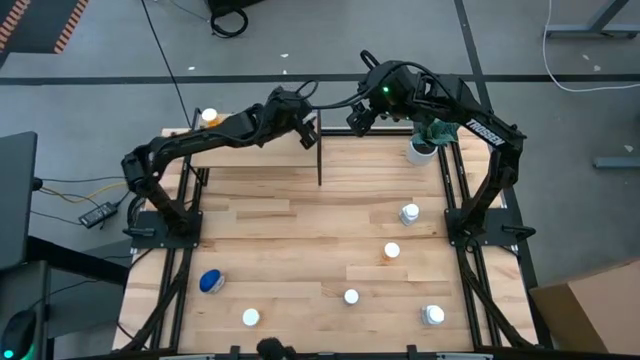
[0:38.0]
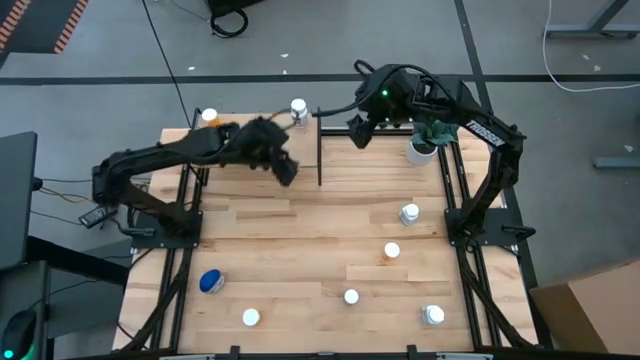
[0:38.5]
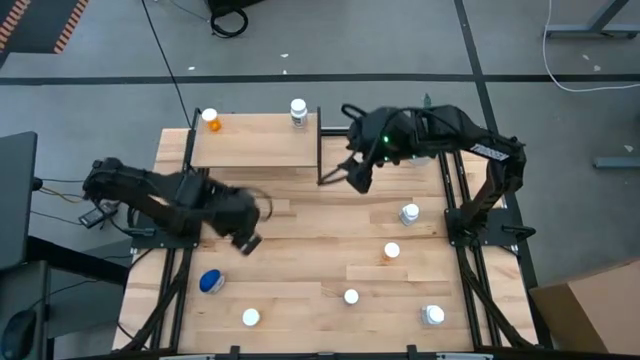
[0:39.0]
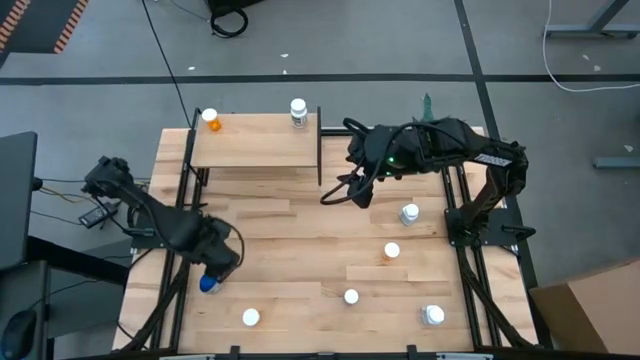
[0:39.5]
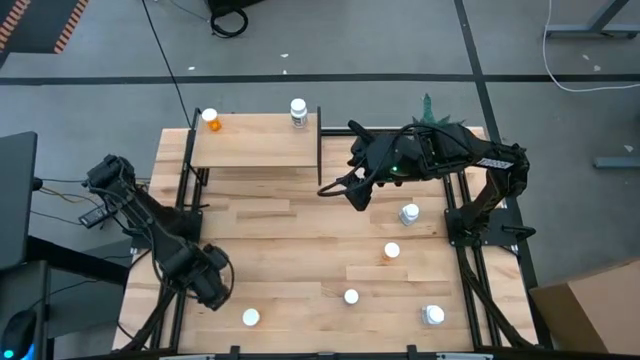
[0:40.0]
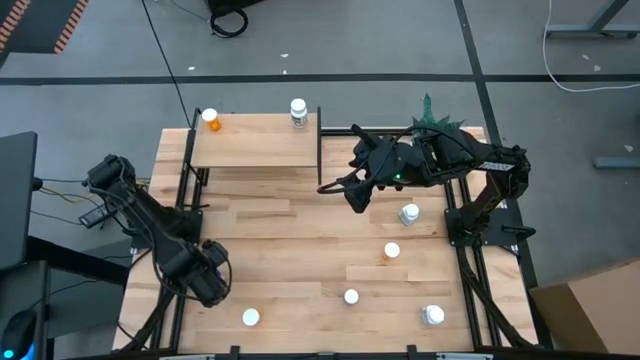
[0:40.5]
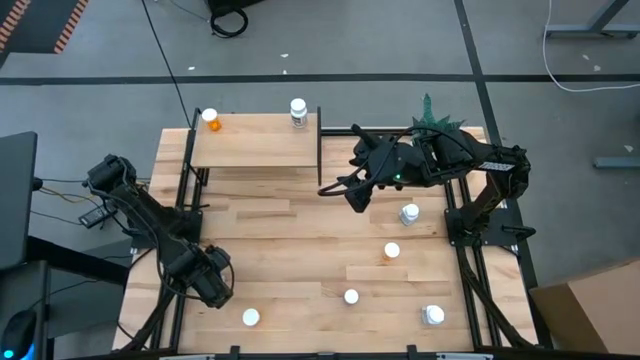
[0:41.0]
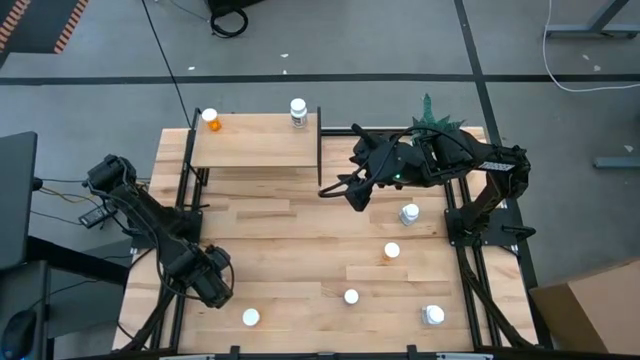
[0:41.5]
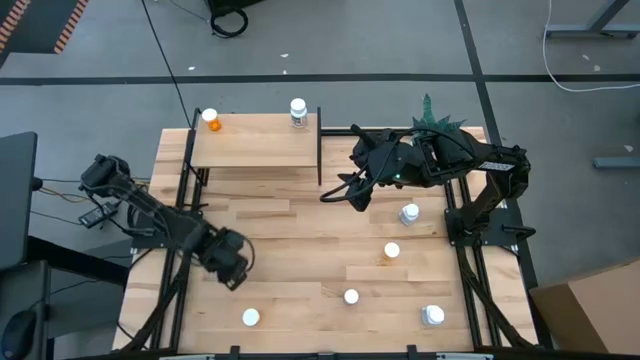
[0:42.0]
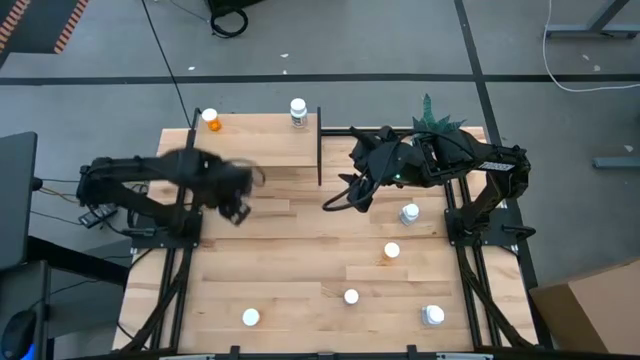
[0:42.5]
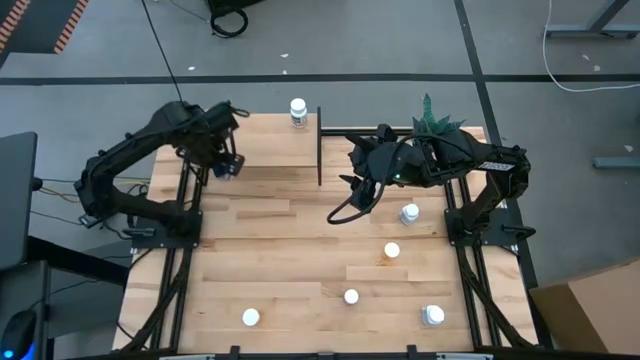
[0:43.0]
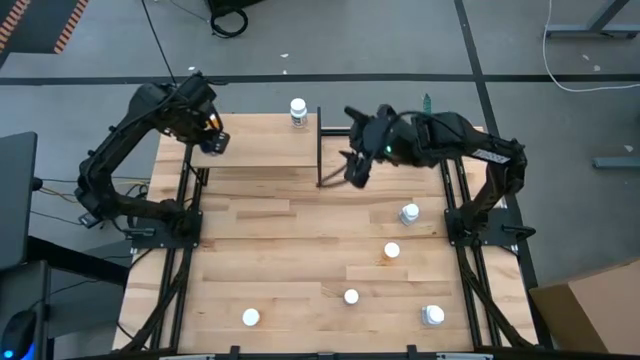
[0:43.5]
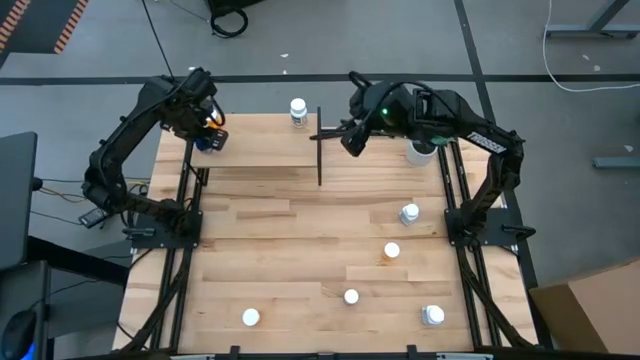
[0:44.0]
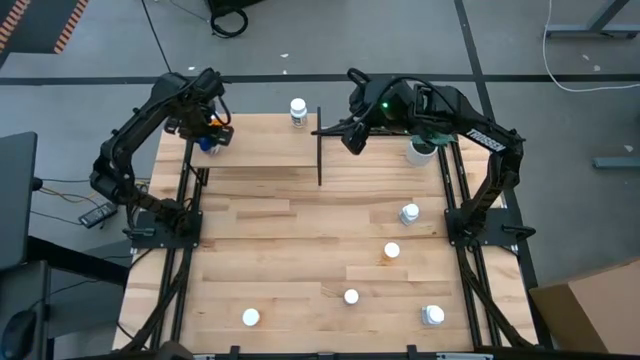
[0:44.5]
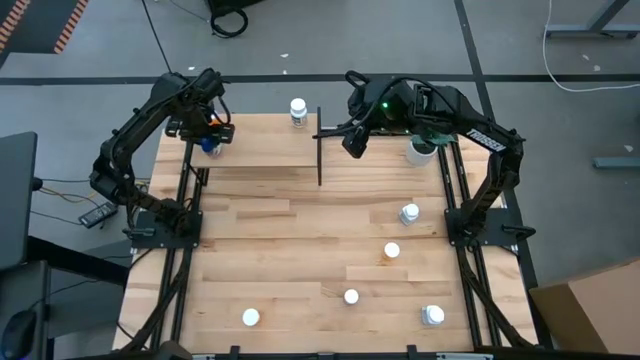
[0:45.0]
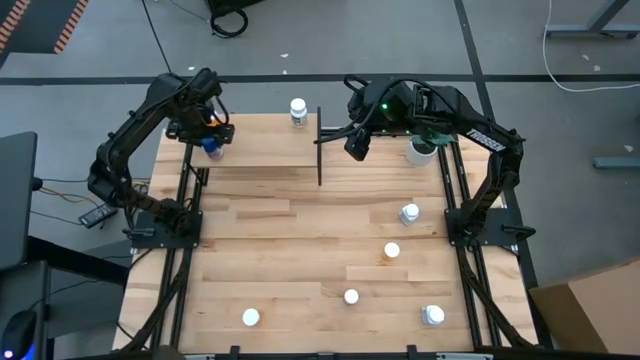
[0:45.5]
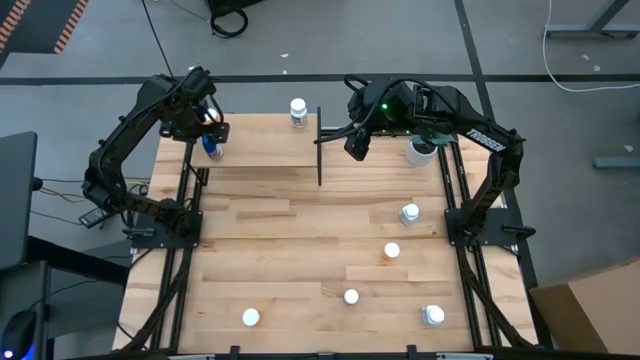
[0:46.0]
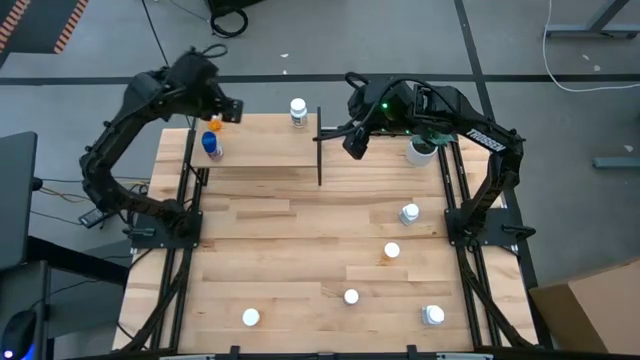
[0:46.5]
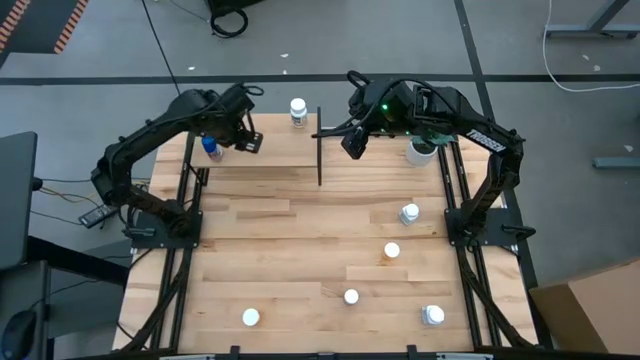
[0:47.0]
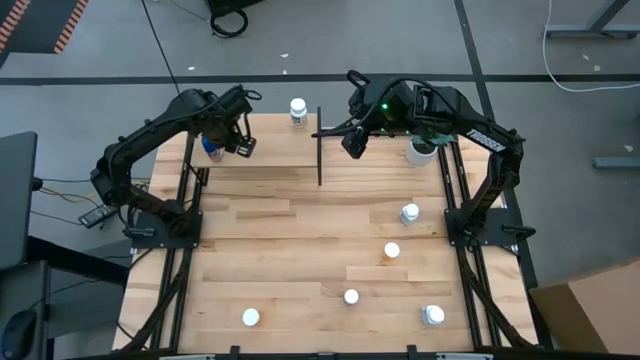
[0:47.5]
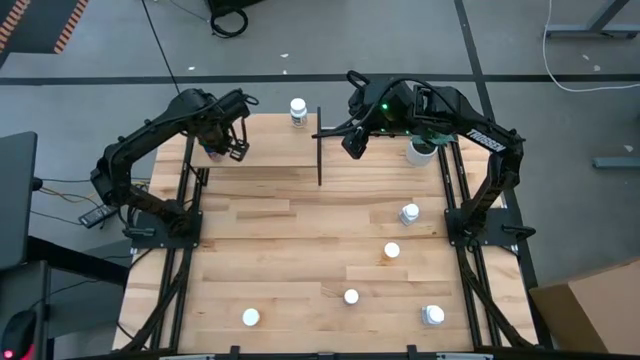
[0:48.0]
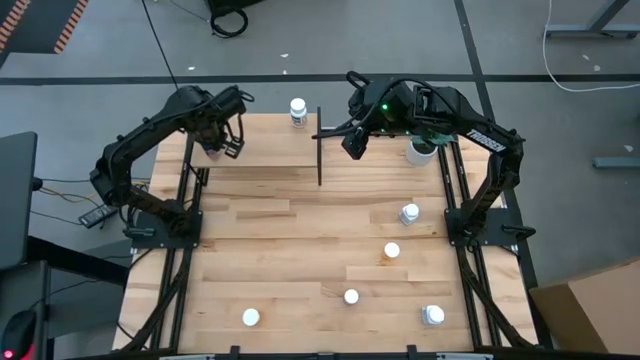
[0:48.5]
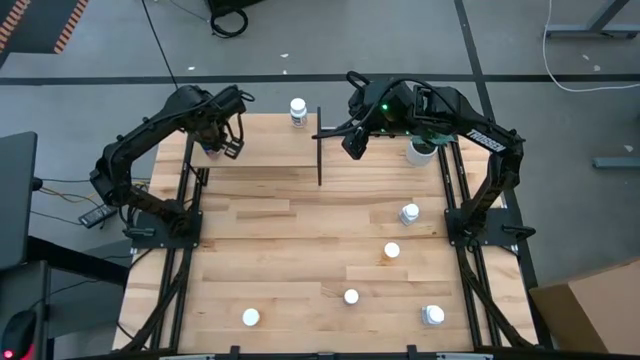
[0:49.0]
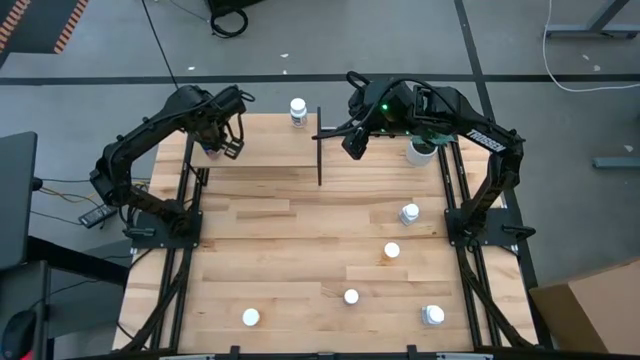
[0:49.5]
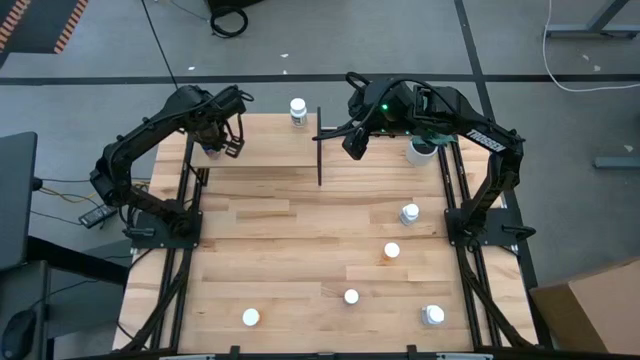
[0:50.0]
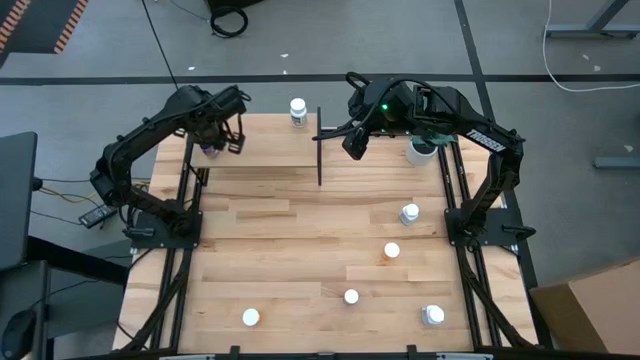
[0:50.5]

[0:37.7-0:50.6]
Task: Pick and place medicine bottles onto shelf by color
Put the blue pill bottle on the shelf

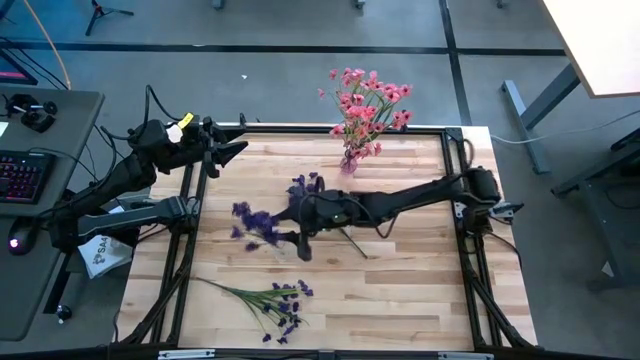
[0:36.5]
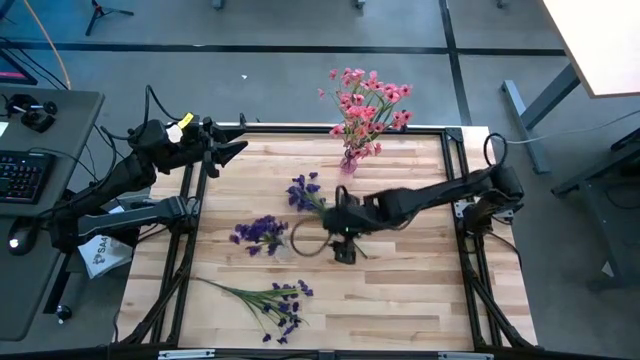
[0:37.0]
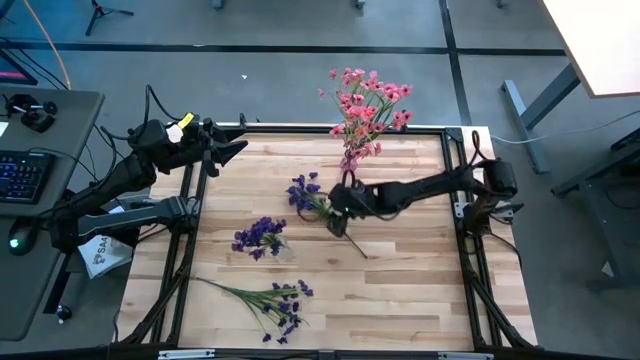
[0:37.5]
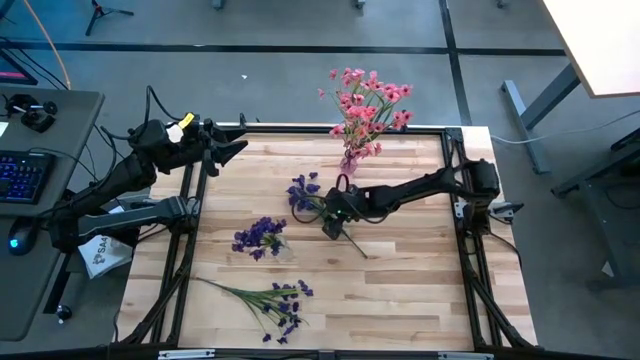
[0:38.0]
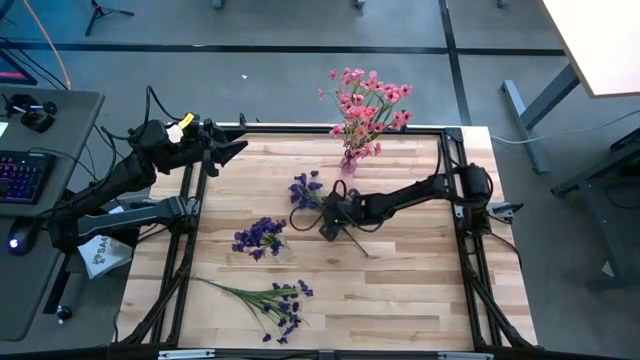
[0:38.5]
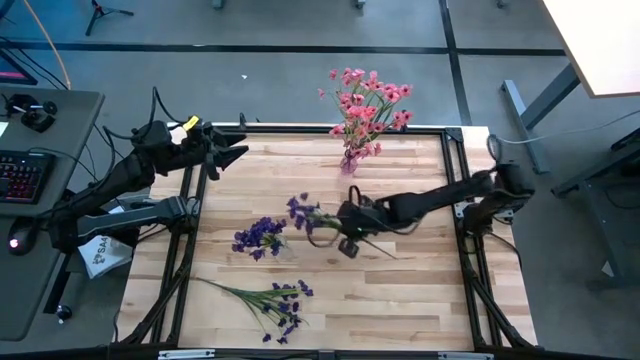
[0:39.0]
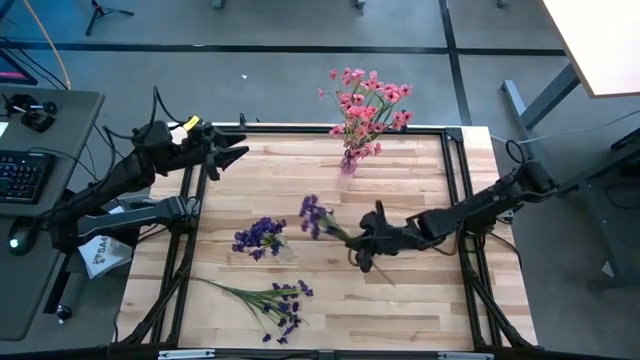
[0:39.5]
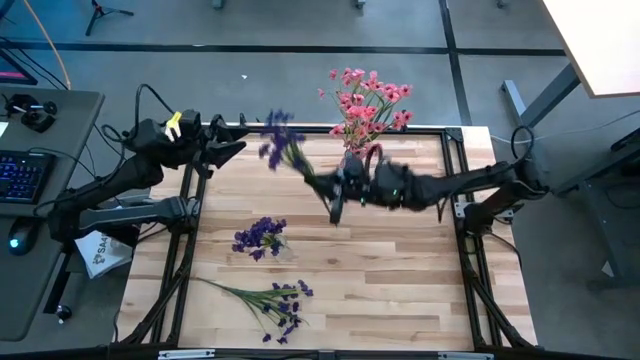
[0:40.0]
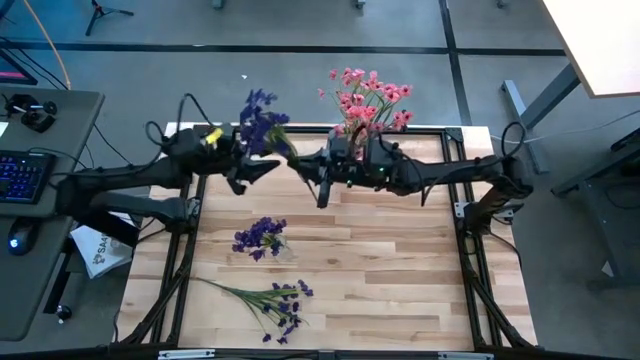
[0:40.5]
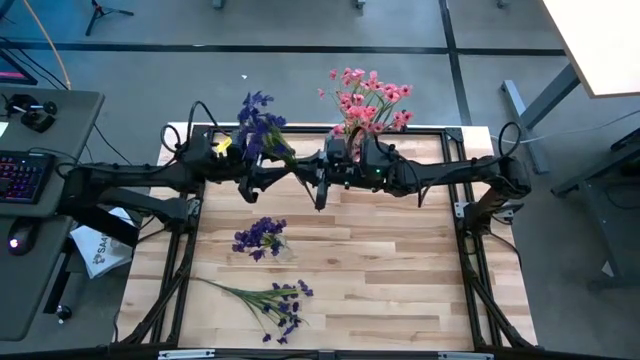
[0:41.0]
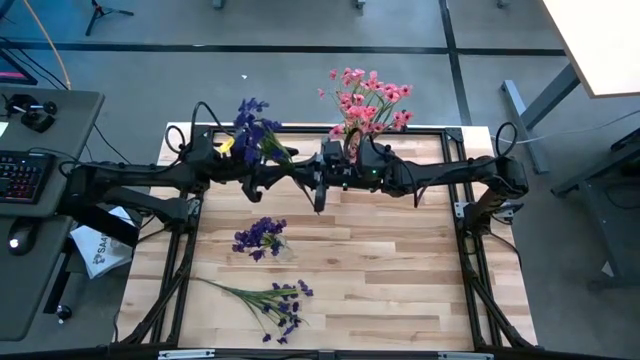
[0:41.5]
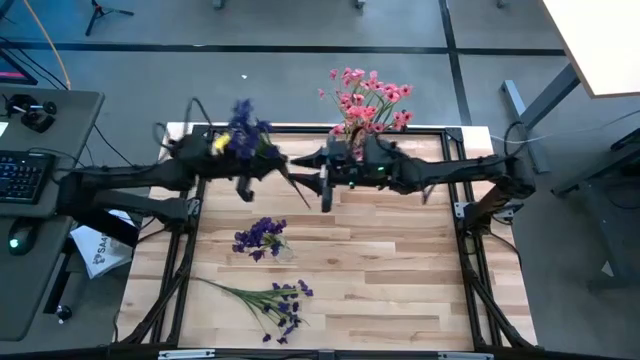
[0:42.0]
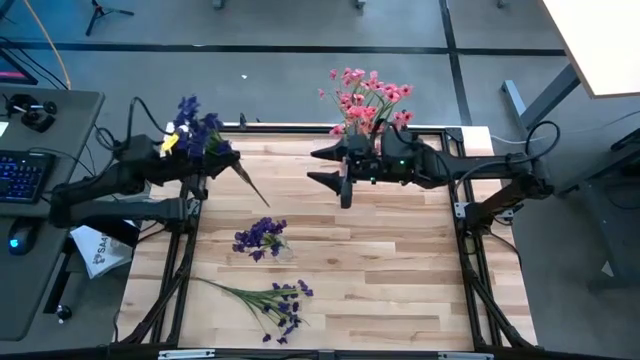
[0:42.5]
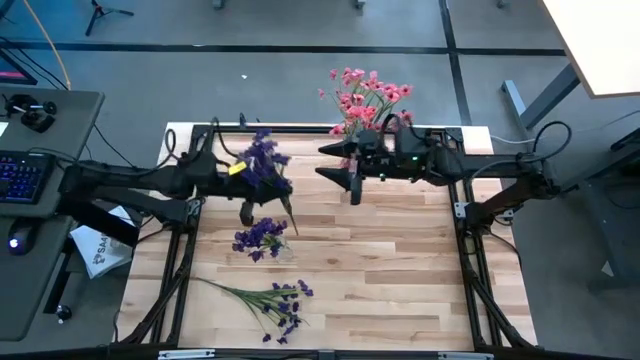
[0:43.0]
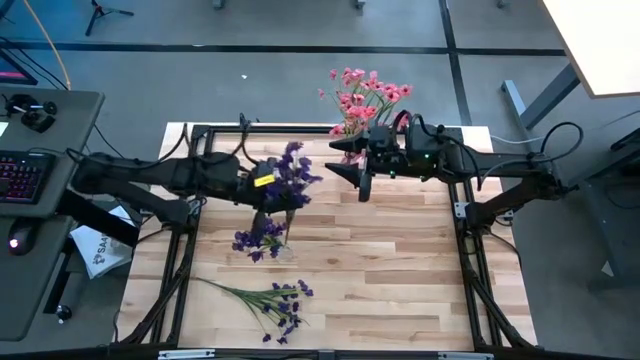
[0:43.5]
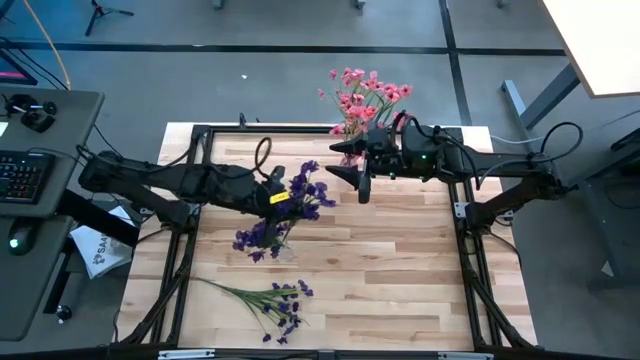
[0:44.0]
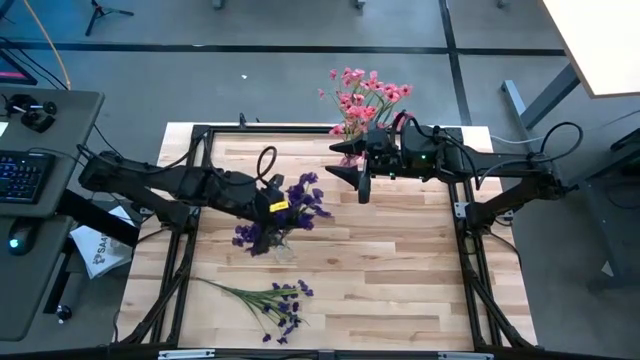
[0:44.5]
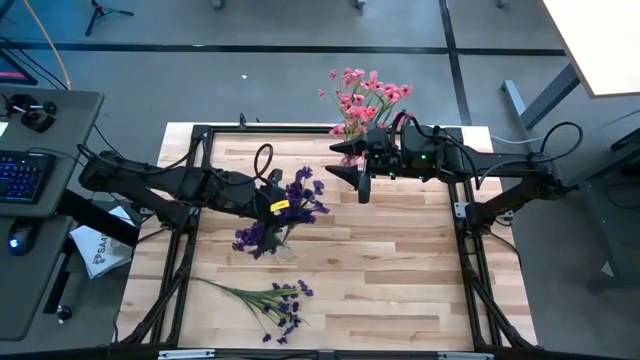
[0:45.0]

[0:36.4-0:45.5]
Task: Sort flowers into vase by color
Put the left purple flowers into the transparent vase
